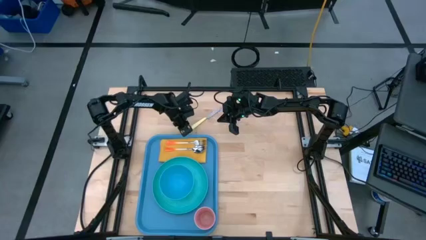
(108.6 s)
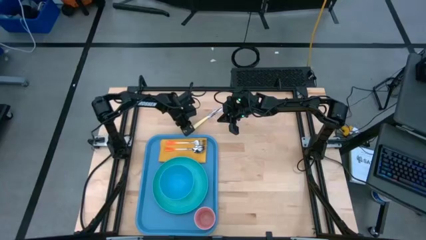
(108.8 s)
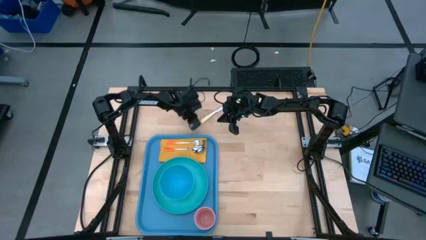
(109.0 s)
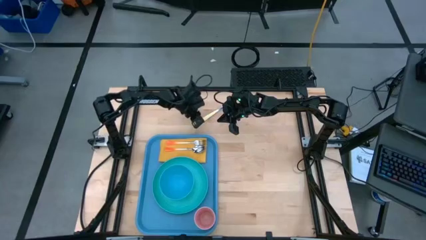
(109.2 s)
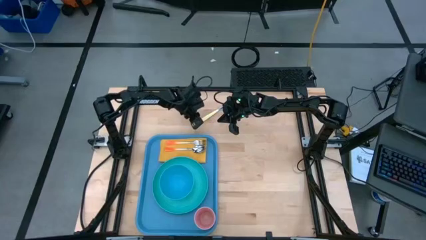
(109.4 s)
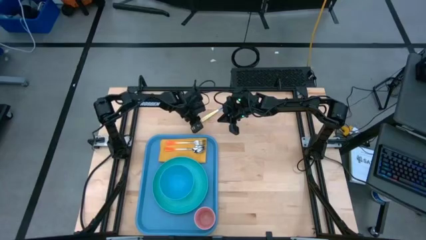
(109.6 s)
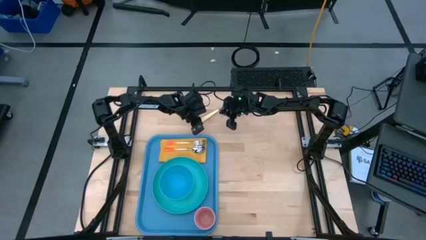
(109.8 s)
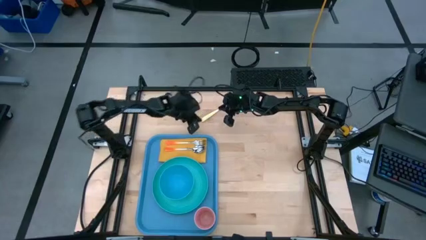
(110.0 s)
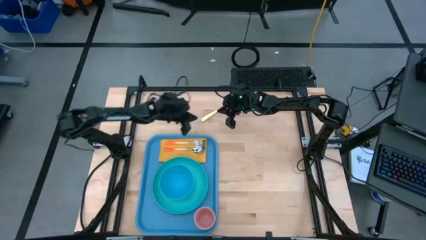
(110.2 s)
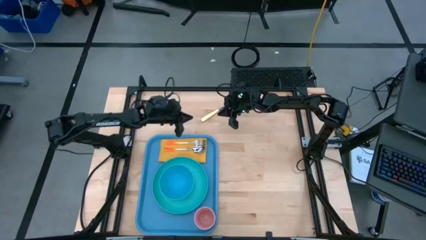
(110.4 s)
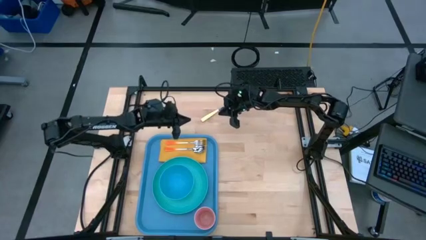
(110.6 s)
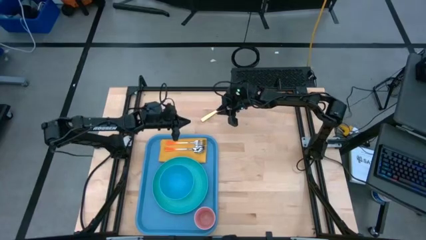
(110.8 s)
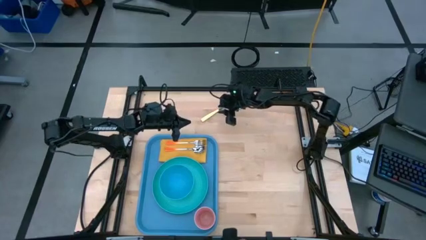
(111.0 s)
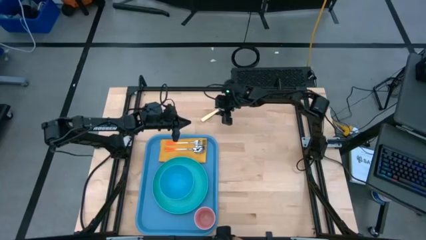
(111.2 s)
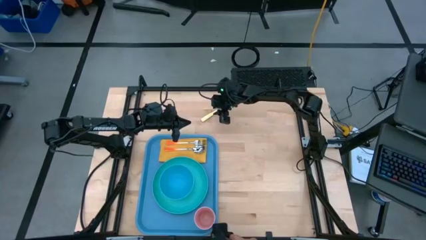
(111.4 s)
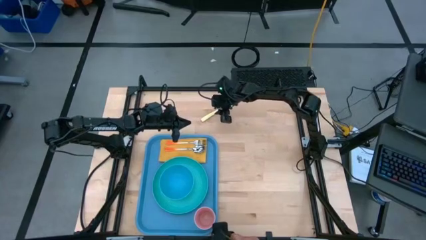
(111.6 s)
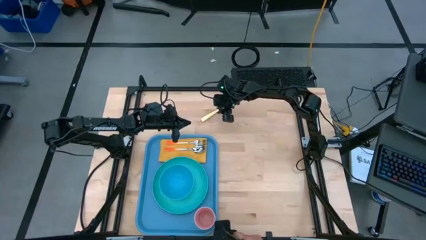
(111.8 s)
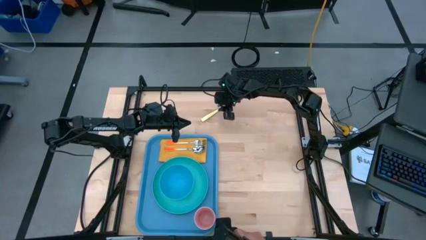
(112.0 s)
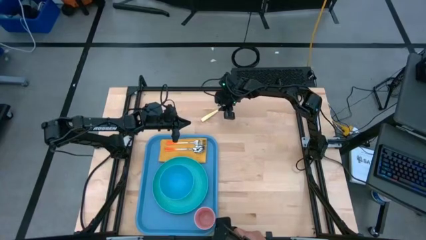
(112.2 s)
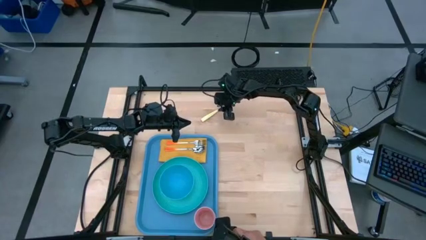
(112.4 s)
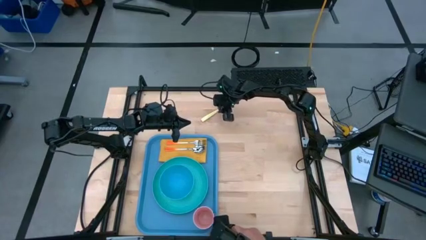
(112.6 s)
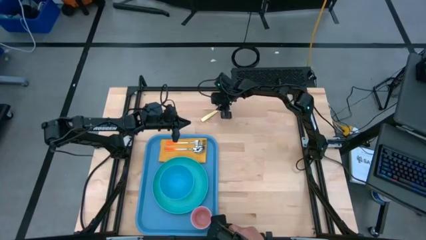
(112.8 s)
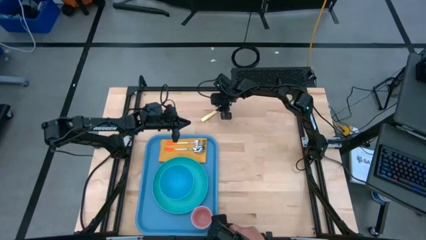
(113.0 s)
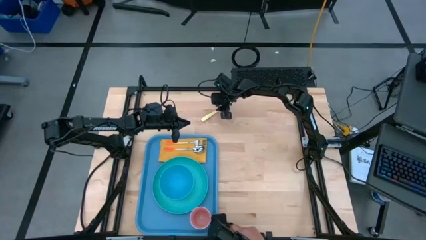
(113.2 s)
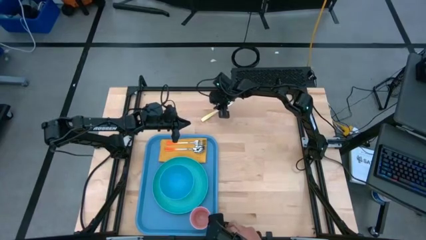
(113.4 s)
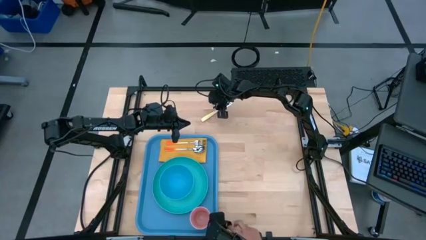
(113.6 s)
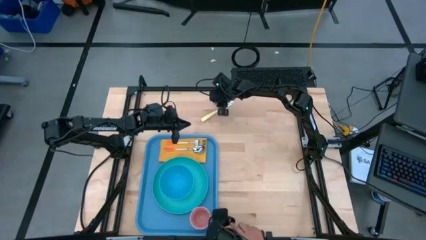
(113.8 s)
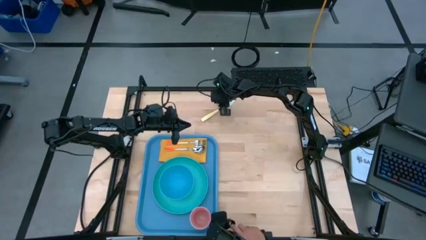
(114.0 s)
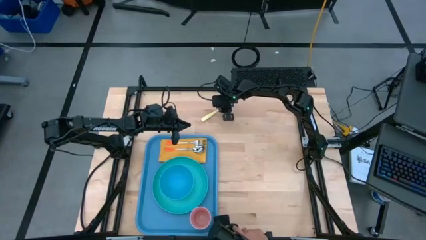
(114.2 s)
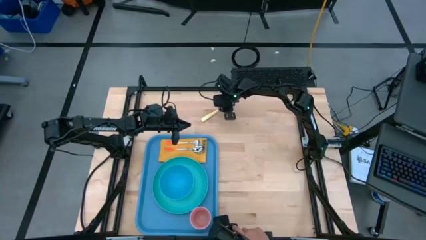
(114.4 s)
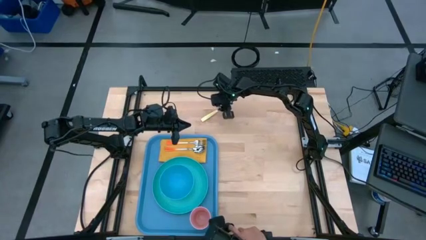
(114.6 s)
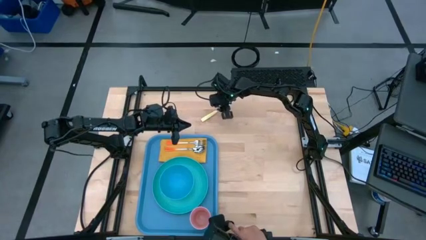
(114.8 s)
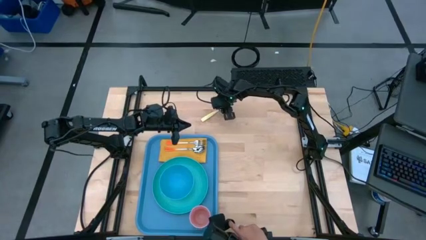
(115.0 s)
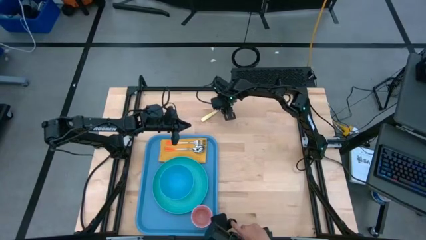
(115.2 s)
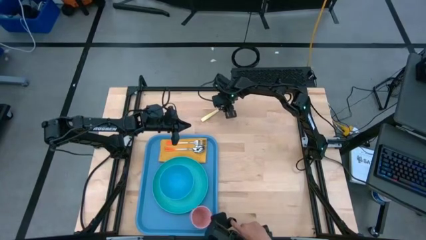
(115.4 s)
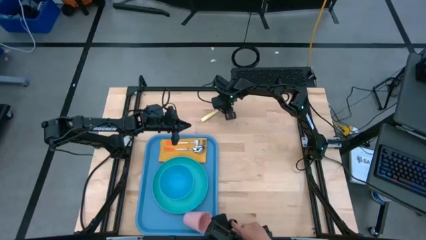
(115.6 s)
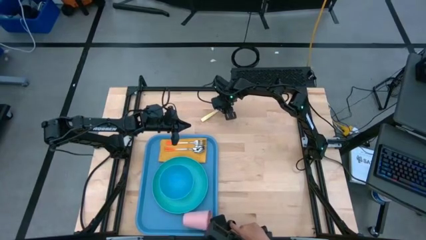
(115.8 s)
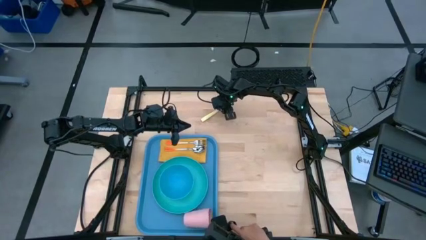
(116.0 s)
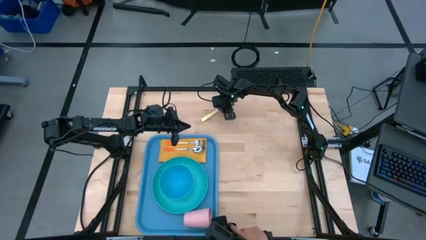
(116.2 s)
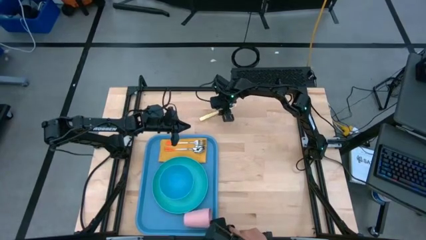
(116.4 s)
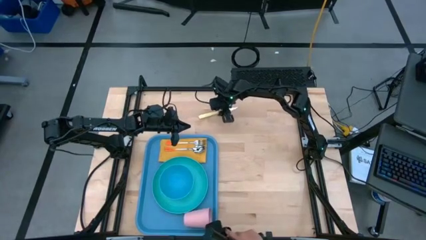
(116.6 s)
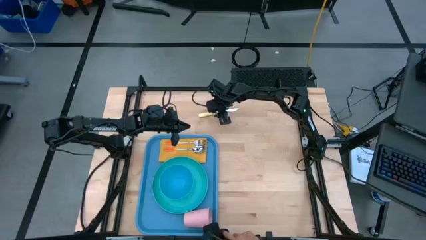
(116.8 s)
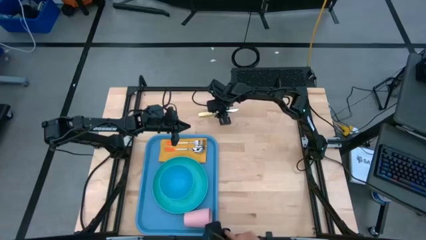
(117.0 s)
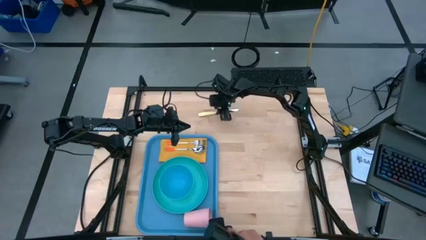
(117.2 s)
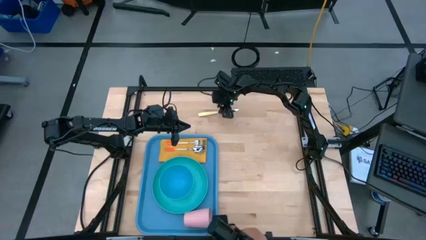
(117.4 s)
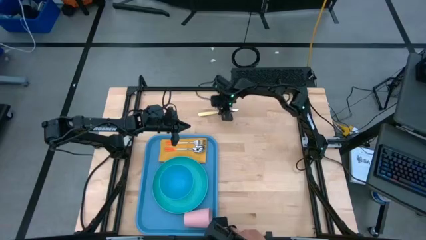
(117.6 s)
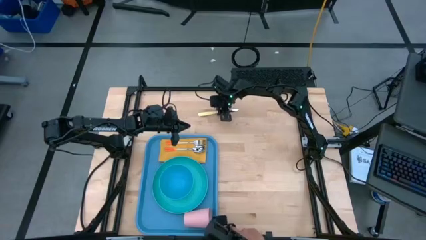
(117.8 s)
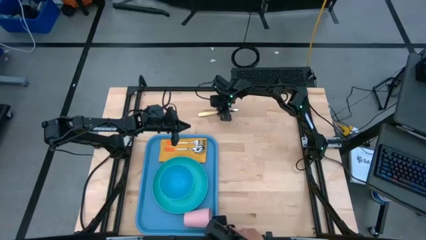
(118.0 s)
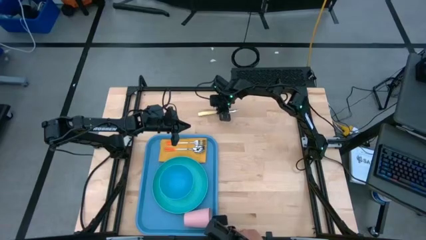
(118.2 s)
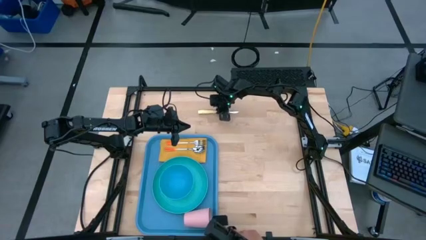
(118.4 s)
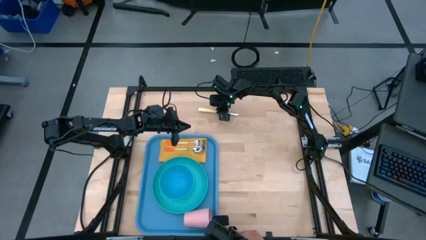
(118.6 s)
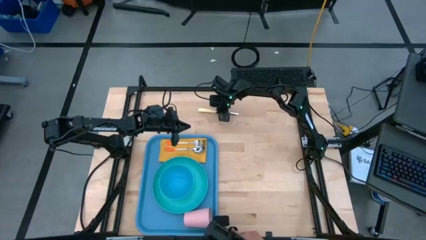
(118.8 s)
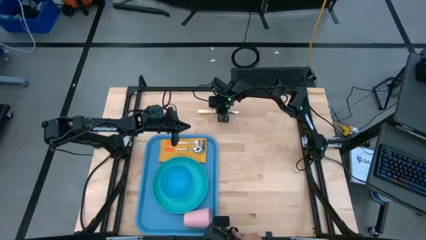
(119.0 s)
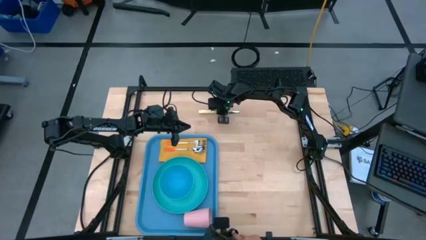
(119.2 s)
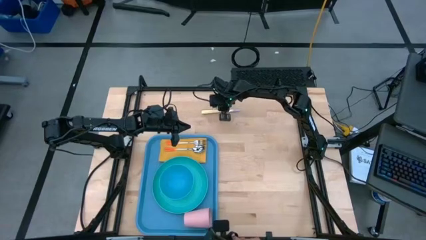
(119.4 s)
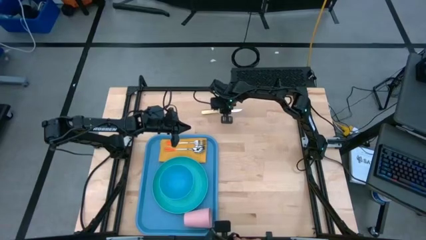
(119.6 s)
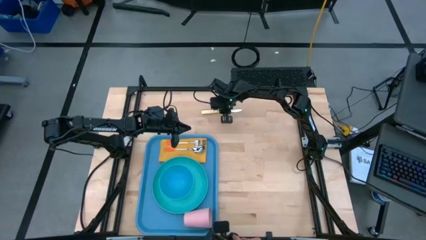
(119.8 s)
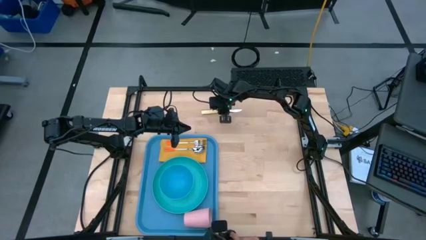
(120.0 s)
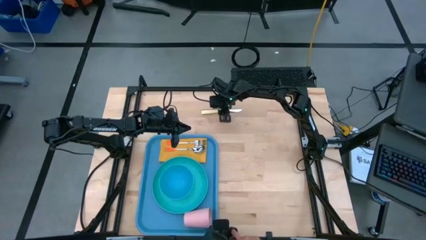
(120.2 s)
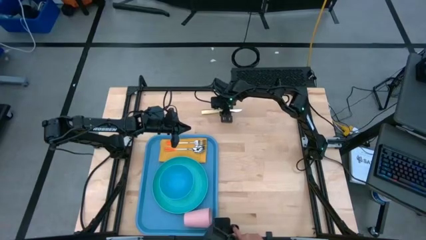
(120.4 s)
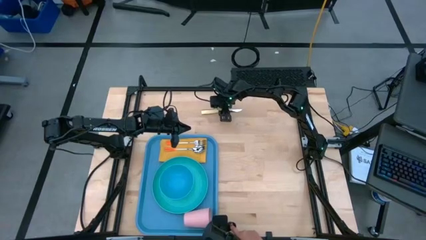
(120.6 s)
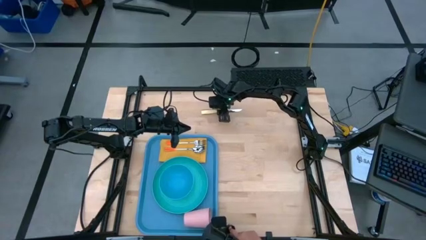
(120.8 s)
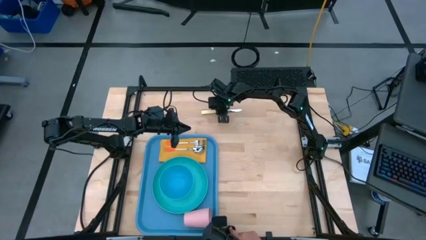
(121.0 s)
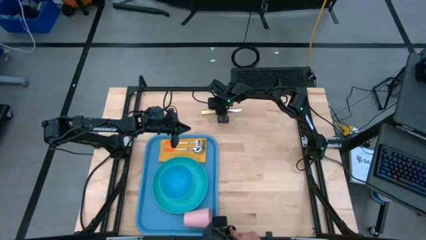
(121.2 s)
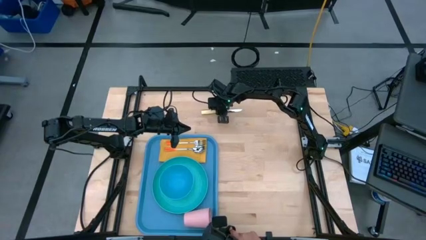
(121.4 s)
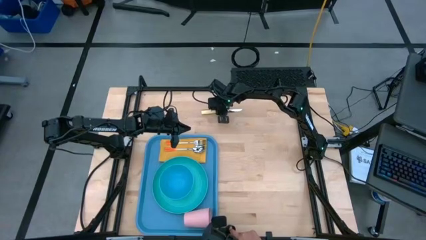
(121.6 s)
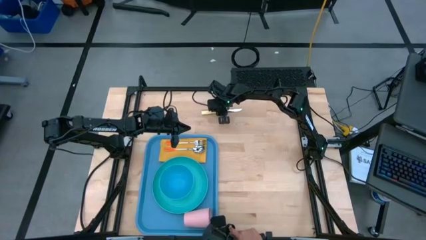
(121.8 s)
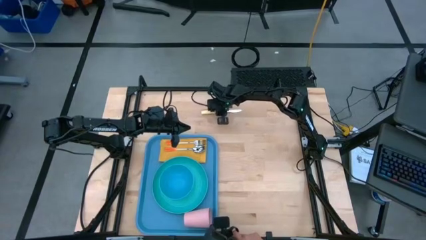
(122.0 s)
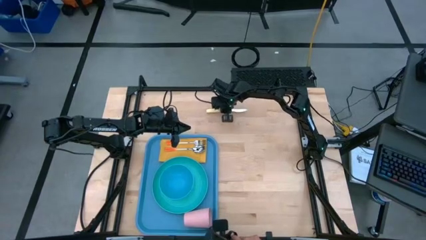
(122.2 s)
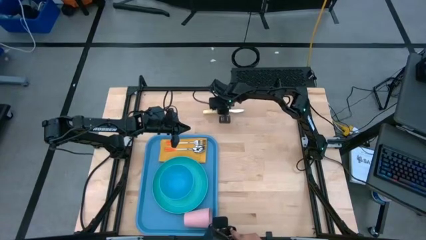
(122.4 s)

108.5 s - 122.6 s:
Task: Set up tray
Put the yellow knife to the bottom of the orange spoon on the yellow napkin on the blue serving tray
